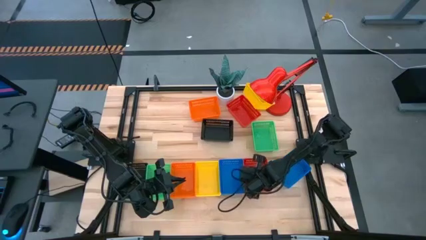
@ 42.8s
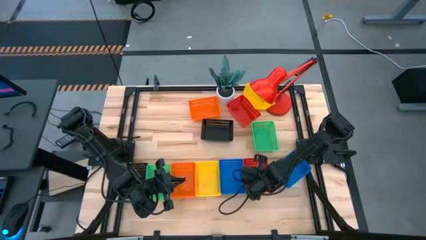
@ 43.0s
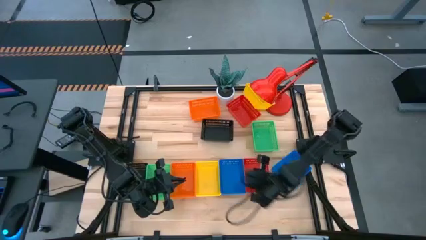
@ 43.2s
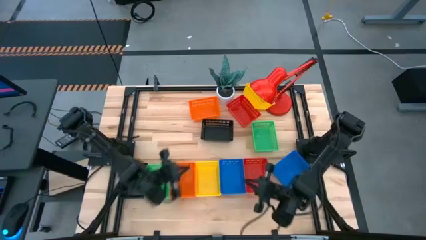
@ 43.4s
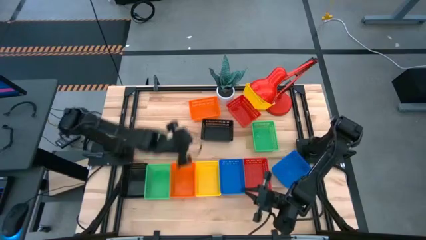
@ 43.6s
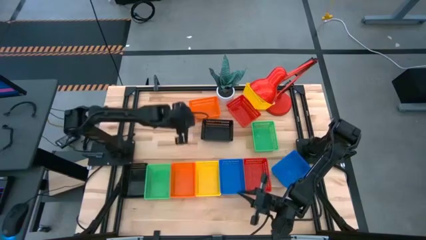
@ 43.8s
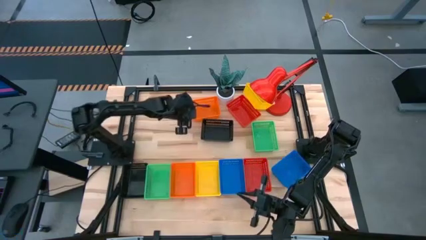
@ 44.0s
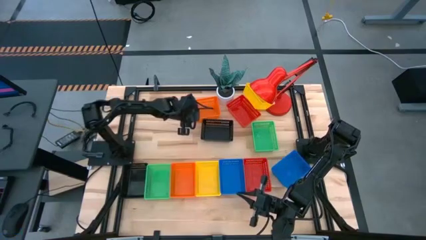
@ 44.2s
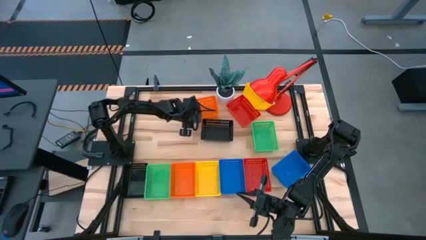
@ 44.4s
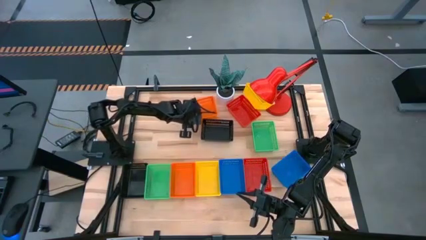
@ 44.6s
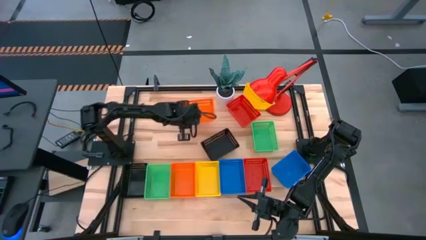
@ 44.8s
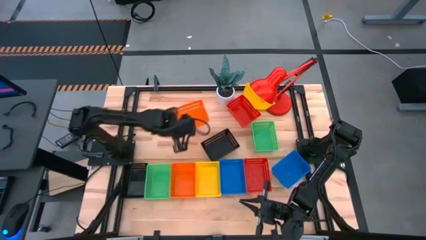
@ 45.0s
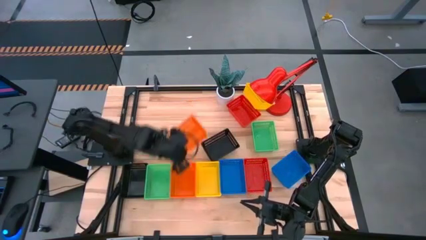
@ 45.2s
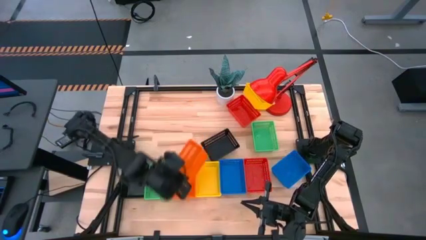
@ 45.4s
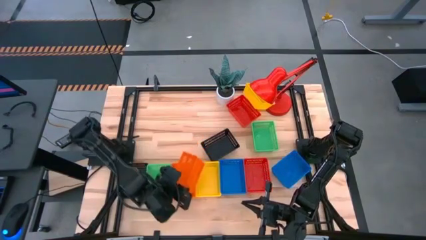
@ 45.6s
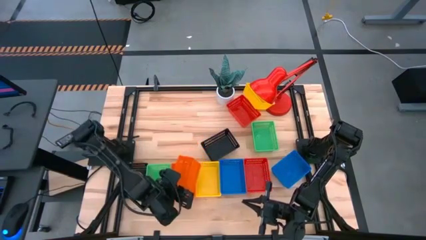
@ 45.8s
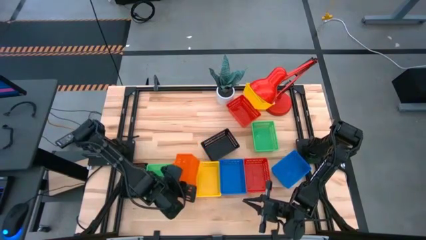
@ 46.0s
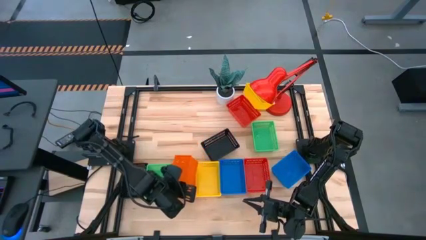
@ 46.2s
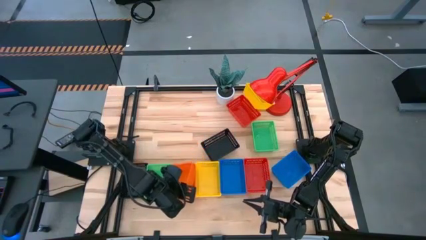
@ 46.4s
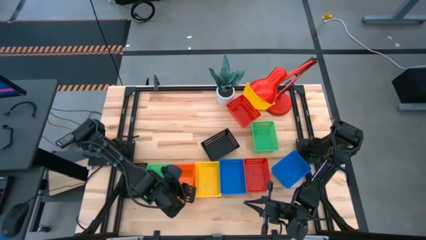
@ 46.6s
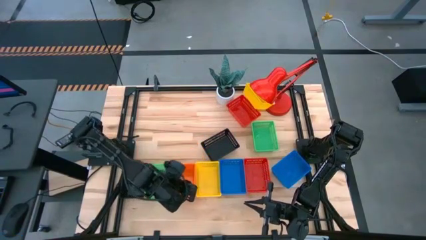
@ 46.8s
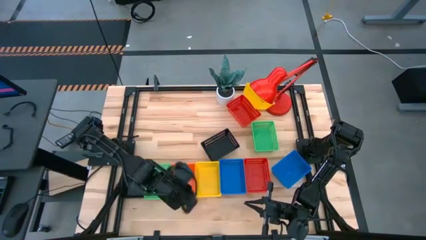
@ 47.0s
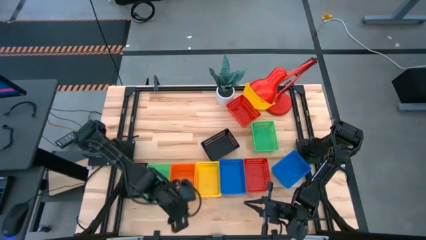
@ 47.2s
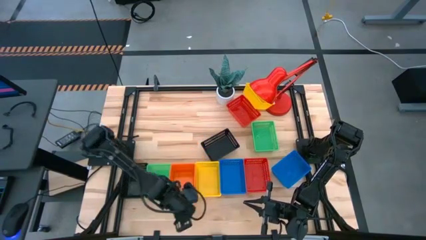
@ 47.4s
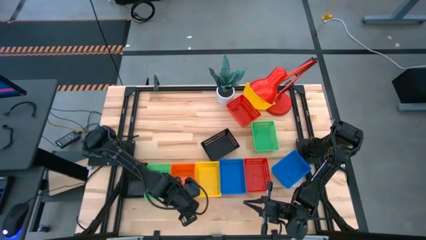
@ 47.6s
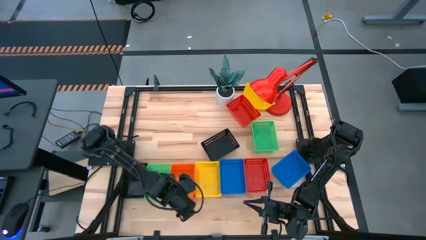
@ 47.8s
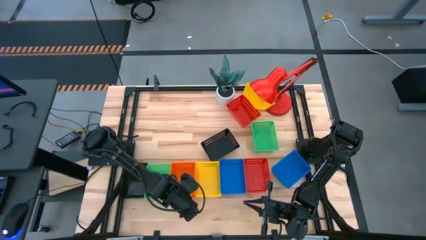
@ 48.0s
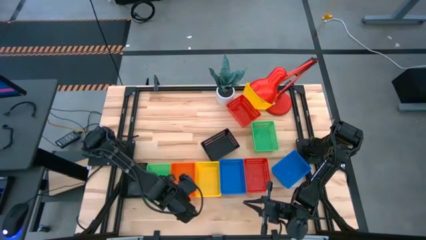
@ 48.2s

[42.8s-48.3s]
Stack the top orange bin on top of the bottom orange bin

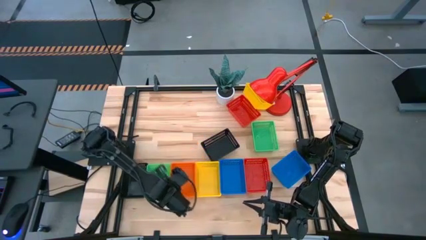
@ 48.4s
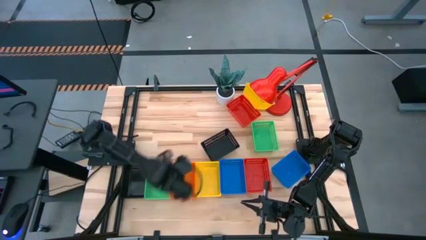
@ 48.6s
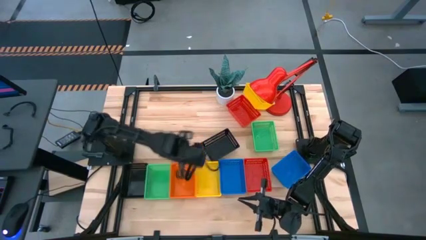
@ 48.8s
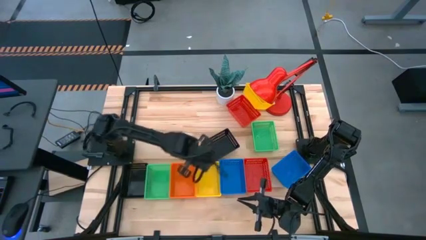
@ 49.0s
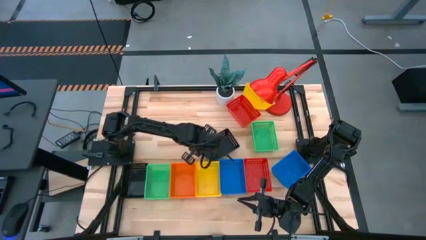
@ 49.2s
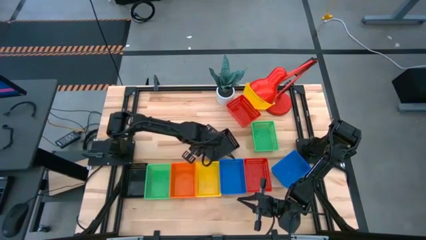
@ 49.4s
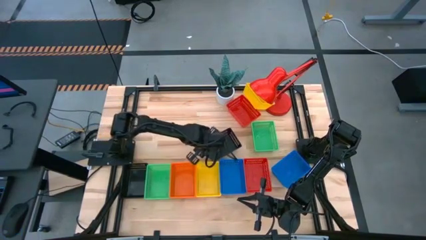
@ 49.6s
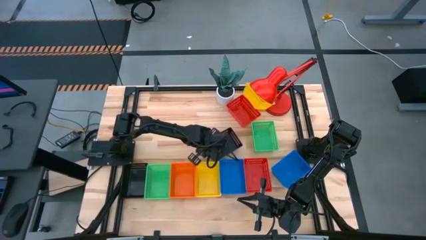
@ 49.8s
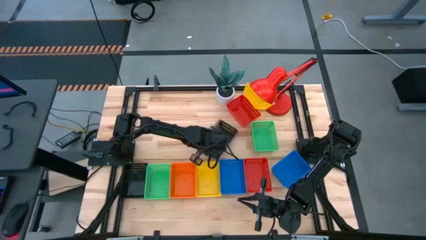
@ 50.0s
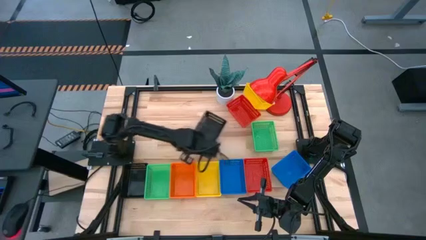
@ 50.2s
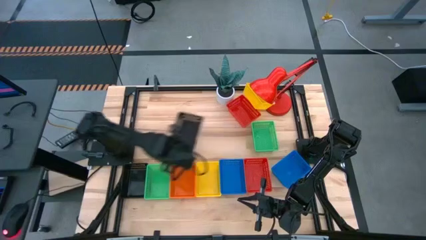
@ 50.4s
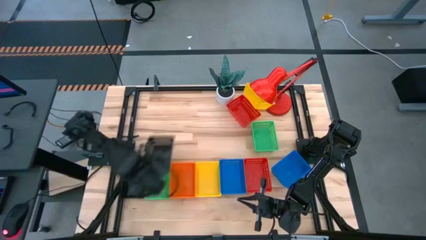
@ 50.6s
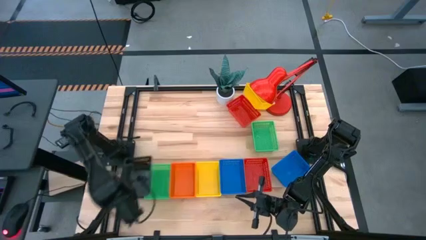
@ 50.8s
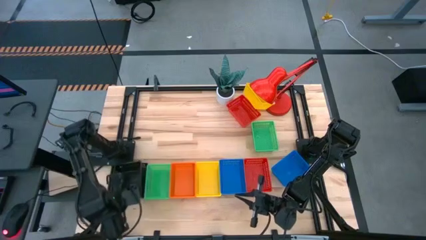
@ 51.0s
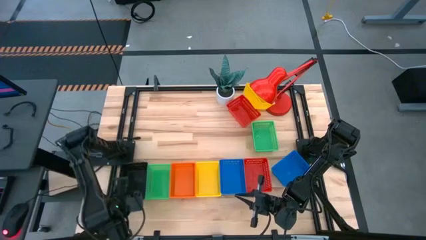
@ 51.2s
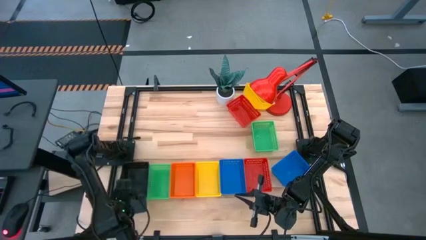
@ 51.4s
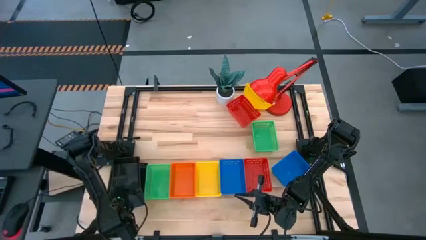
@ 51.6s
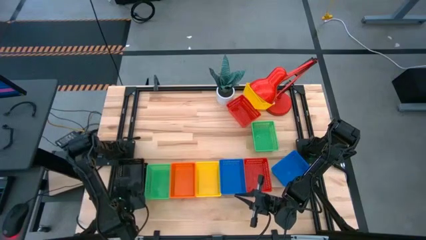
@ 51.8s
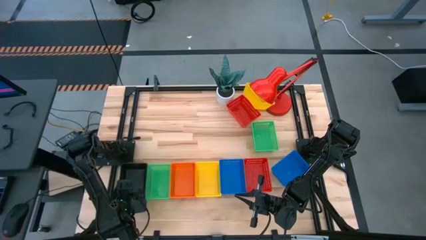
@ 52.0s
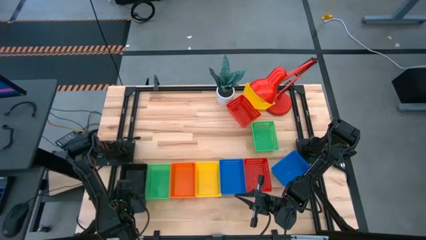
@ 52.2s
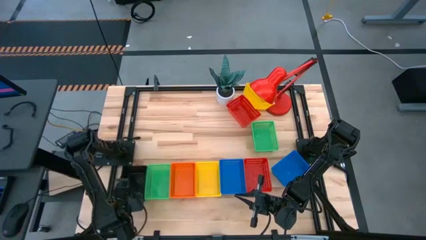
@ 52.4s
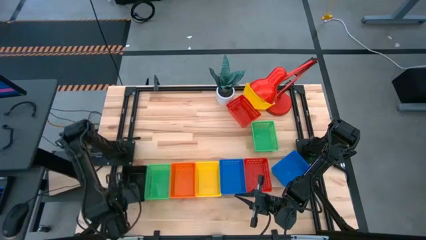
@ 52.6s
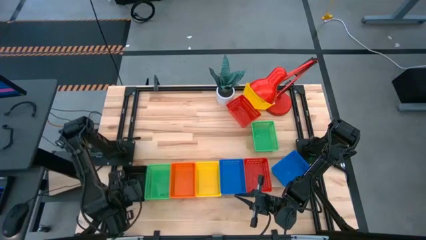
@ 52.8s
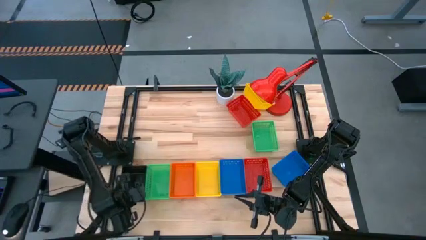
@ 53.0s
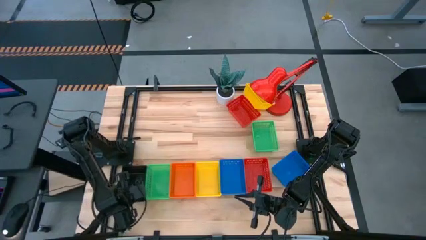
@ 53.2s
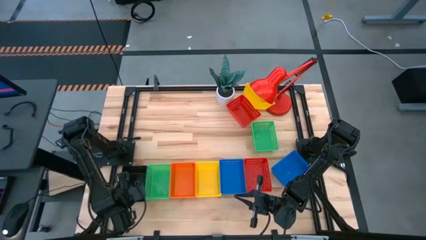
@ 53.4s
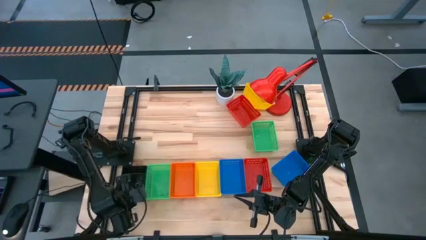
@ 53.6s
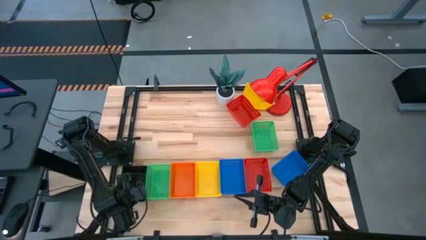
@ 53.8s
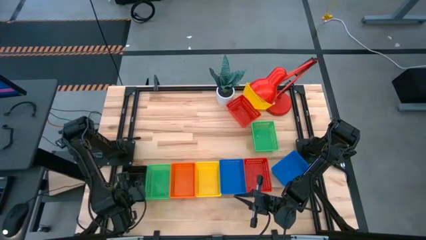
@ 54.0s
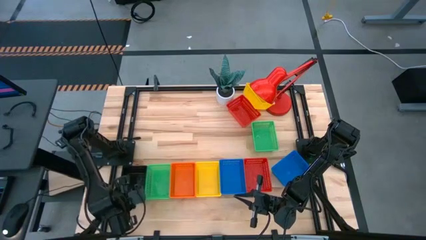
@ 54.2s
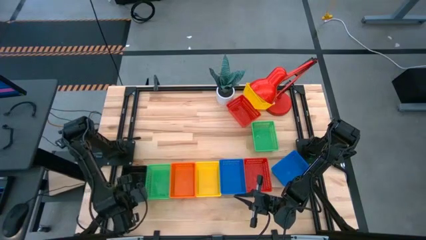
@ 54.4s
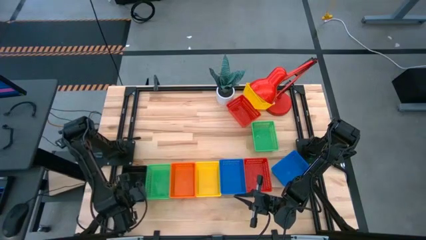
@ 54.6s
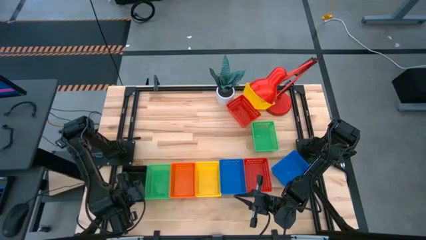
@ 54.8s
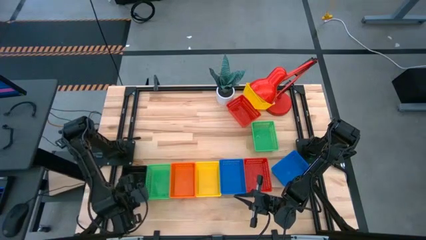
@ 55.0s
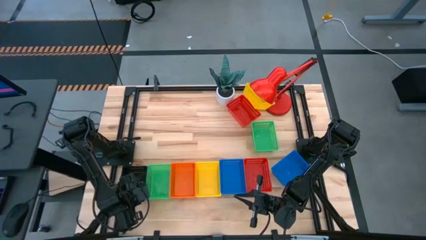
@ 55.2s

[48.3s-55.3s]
Stack the right black bin on top of the left black bin
